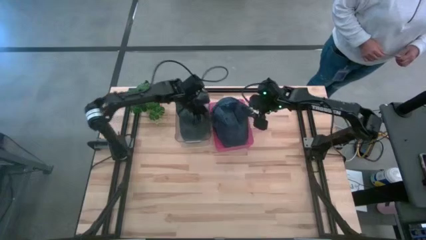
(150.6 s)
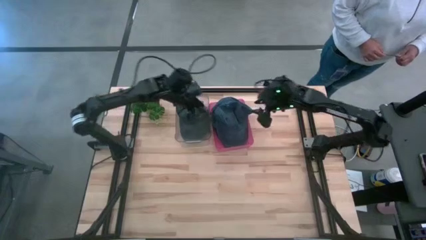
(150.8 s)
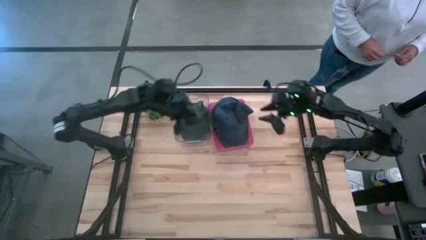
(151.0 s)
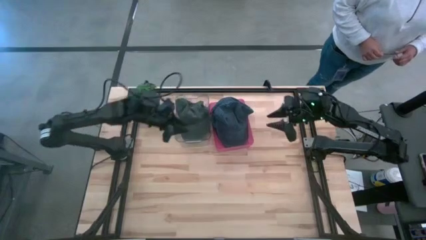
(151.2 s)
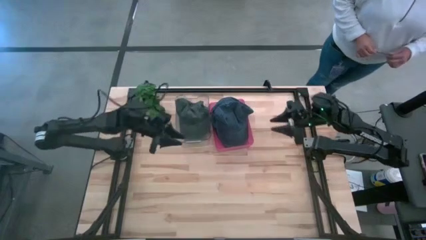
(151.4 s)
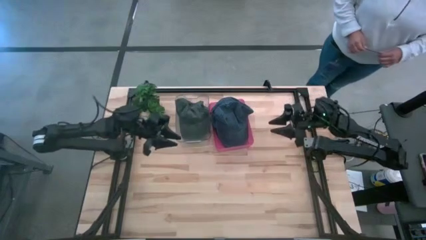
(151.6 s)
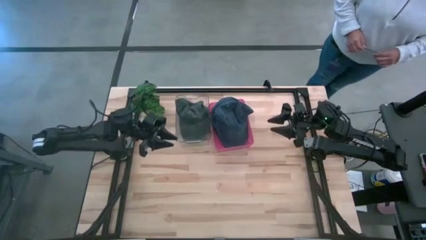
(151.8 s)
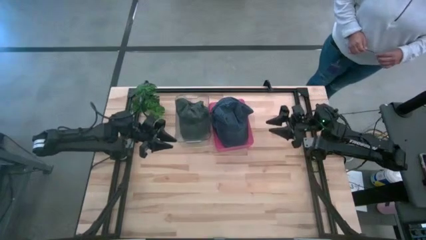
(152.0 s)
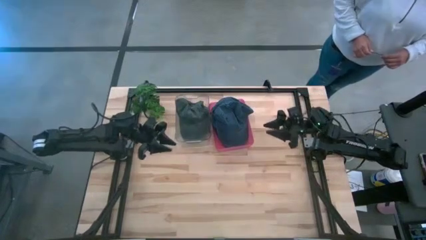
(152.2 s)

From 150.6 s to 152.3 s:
Task: Pick & Place hat
Return to Home Position

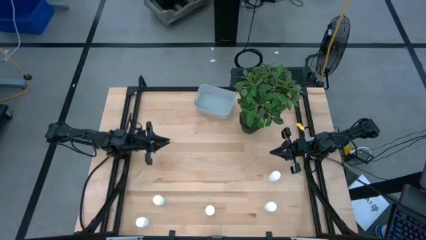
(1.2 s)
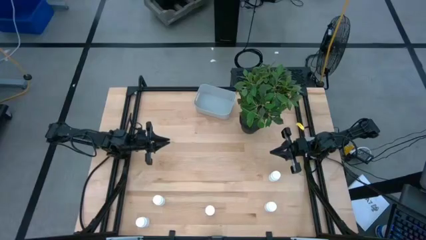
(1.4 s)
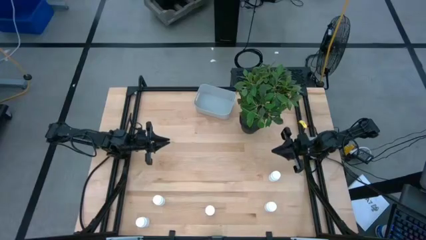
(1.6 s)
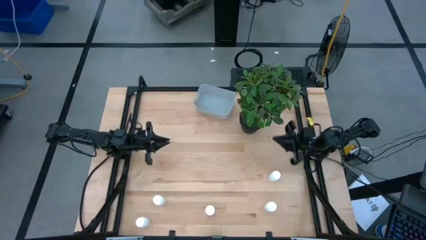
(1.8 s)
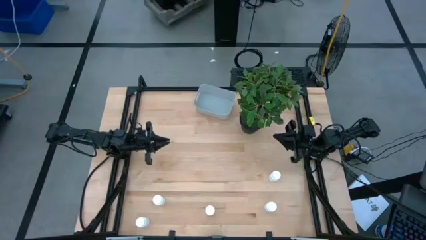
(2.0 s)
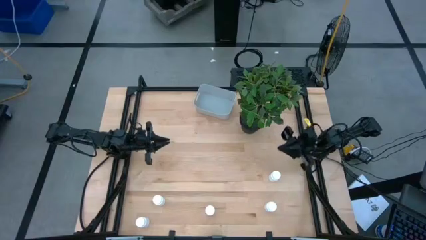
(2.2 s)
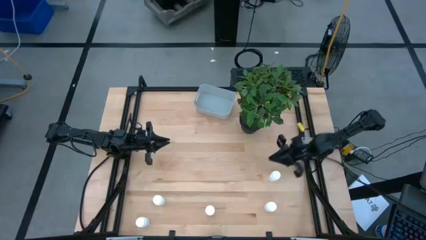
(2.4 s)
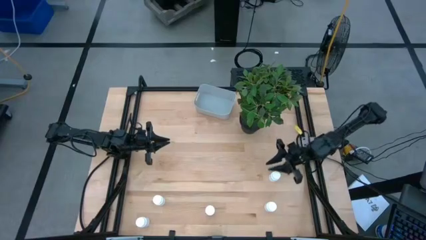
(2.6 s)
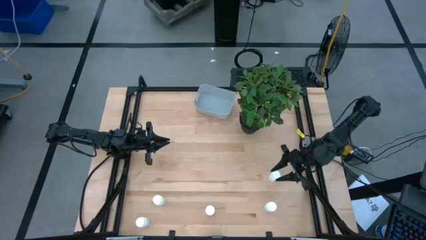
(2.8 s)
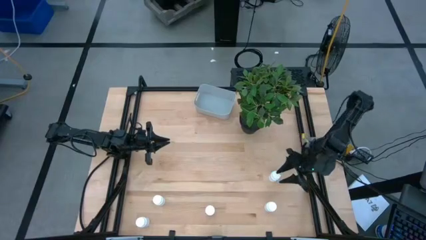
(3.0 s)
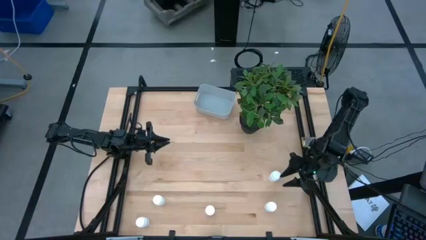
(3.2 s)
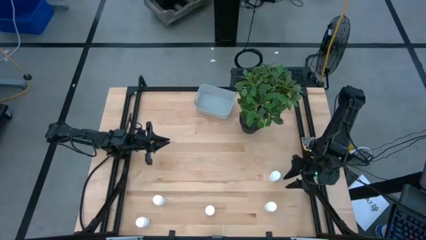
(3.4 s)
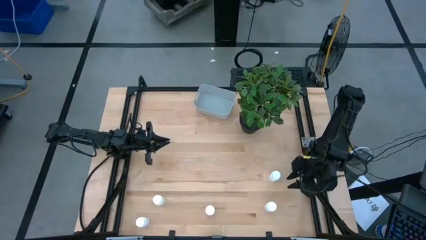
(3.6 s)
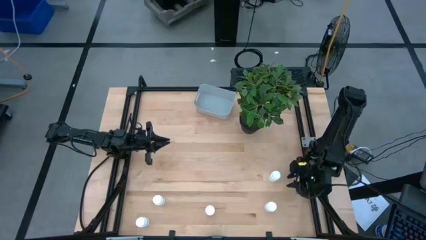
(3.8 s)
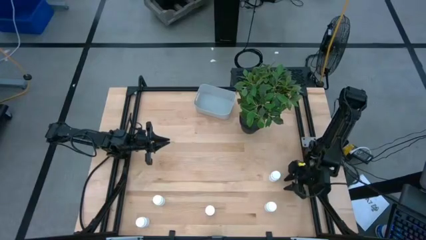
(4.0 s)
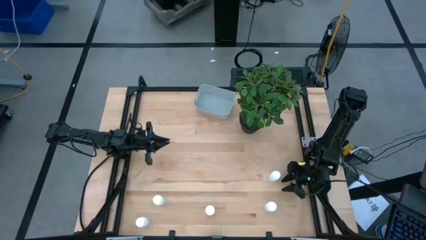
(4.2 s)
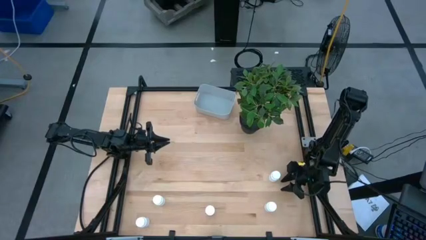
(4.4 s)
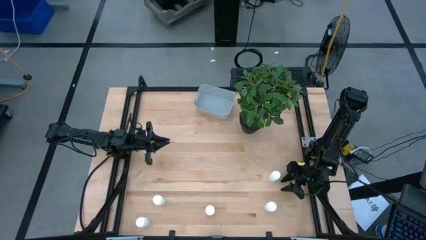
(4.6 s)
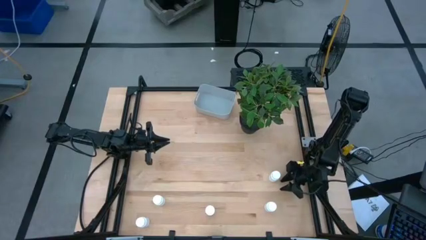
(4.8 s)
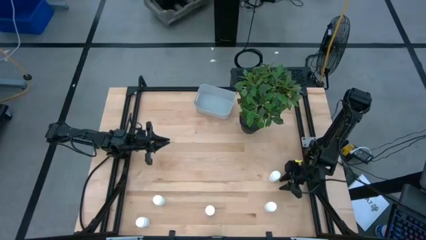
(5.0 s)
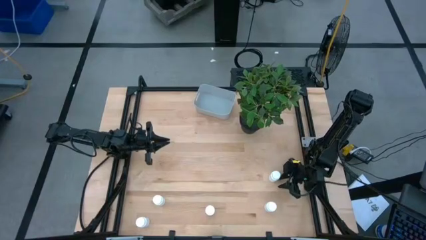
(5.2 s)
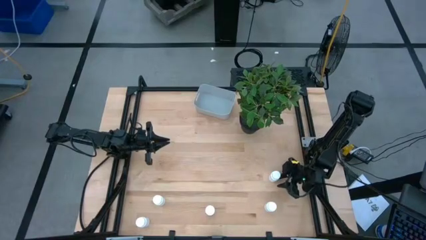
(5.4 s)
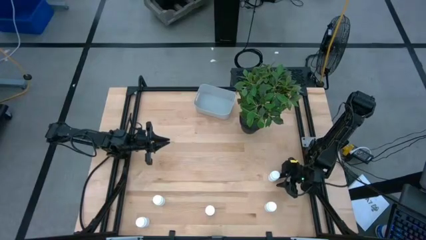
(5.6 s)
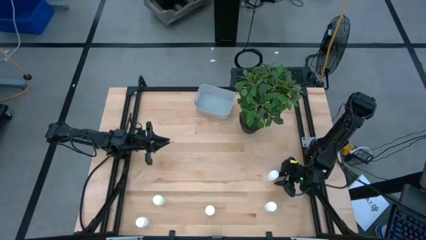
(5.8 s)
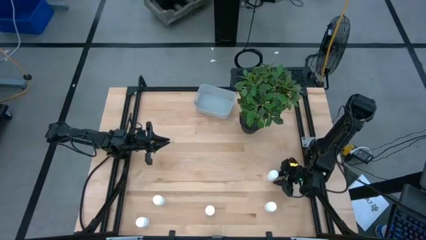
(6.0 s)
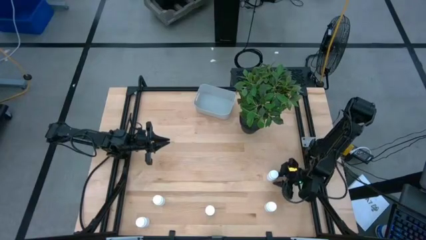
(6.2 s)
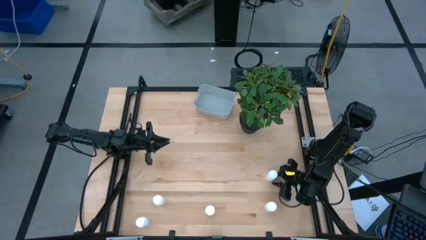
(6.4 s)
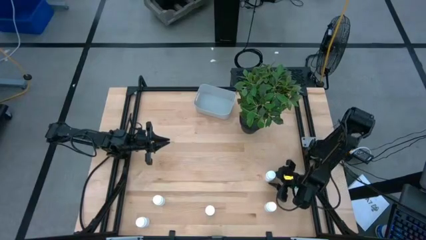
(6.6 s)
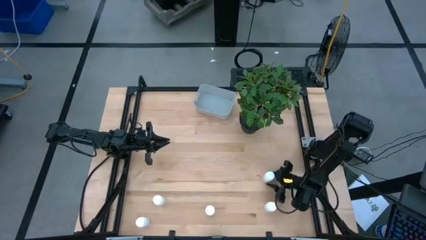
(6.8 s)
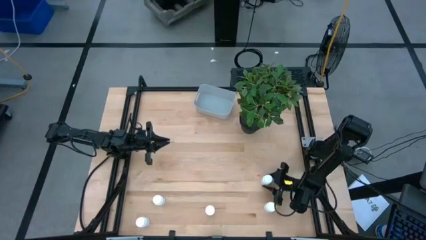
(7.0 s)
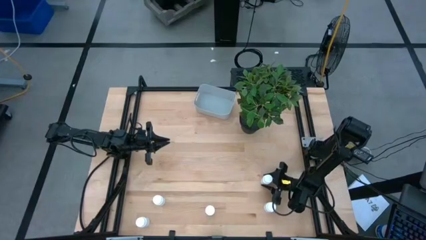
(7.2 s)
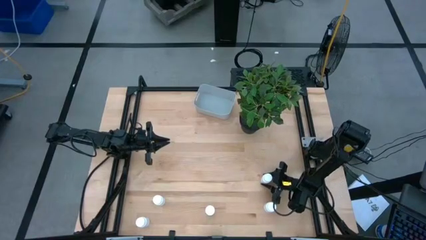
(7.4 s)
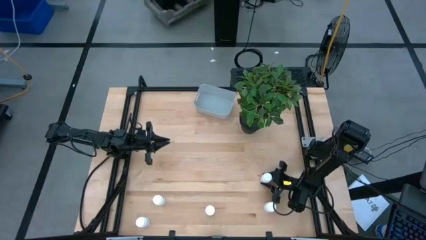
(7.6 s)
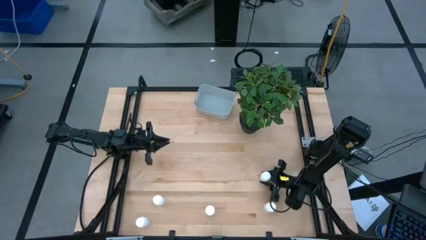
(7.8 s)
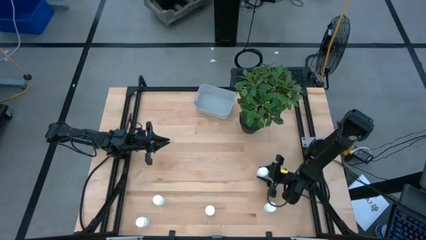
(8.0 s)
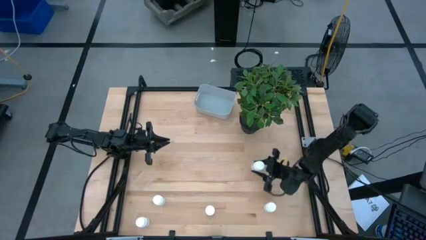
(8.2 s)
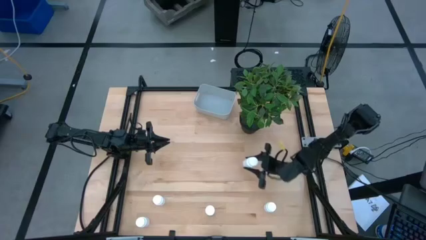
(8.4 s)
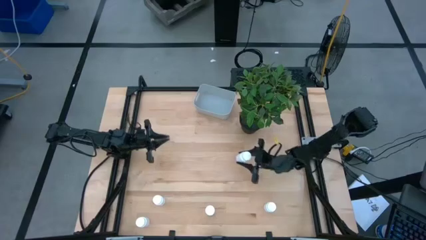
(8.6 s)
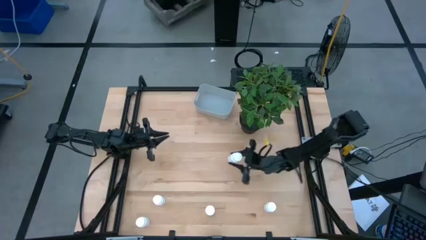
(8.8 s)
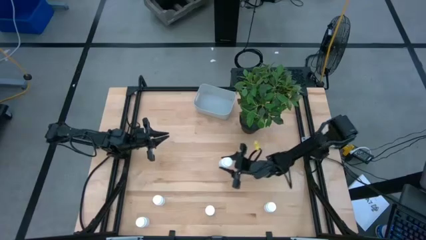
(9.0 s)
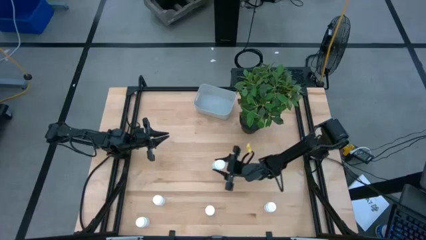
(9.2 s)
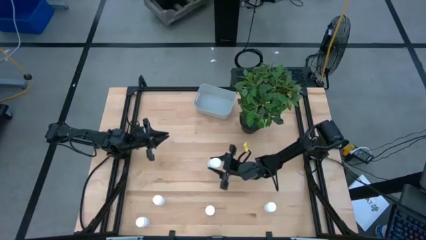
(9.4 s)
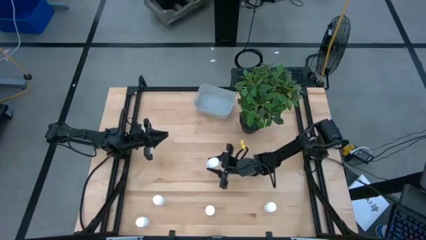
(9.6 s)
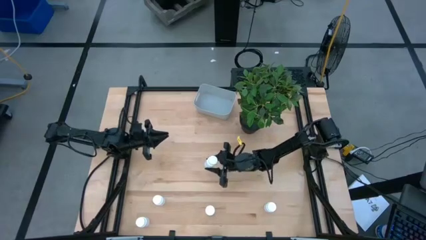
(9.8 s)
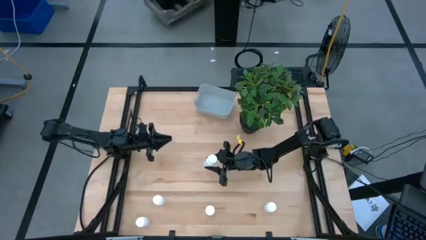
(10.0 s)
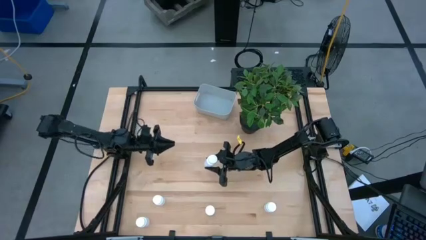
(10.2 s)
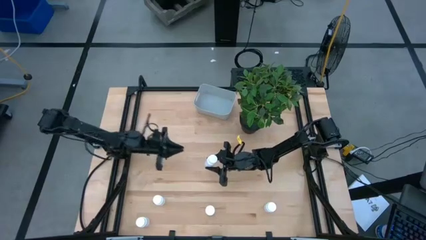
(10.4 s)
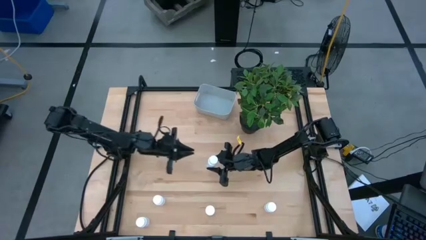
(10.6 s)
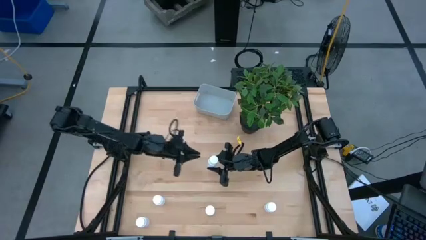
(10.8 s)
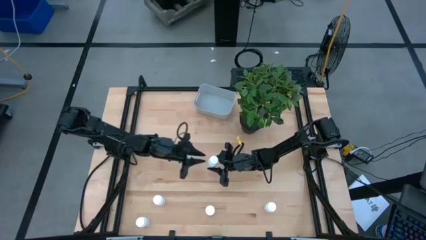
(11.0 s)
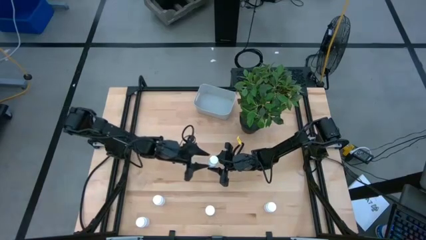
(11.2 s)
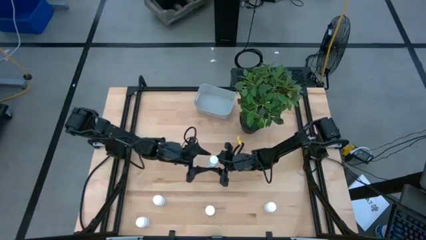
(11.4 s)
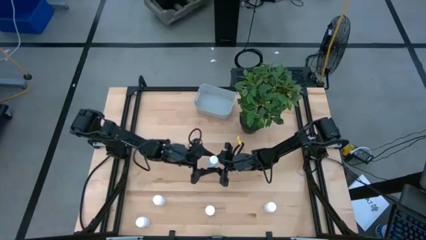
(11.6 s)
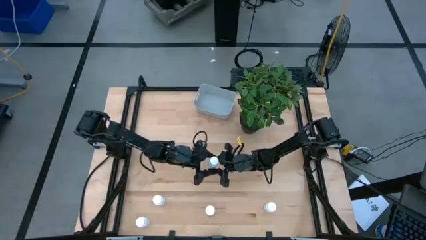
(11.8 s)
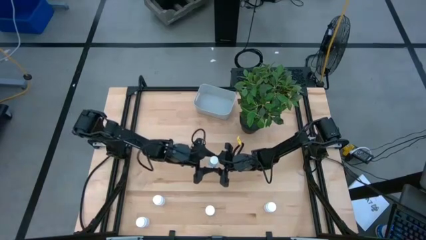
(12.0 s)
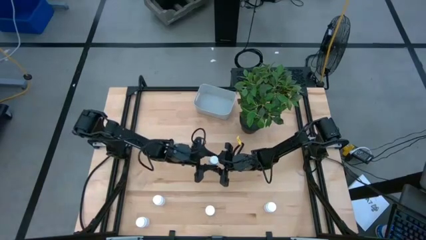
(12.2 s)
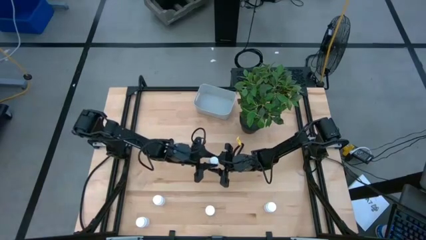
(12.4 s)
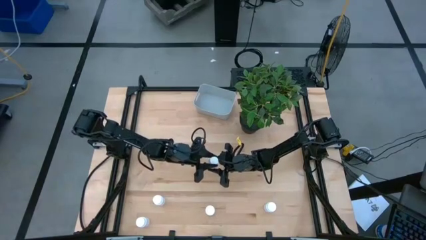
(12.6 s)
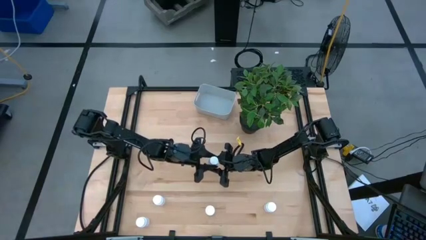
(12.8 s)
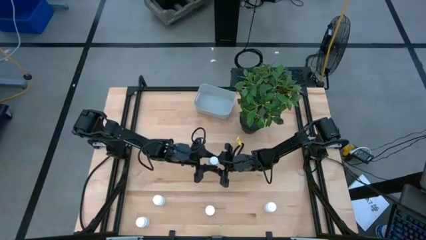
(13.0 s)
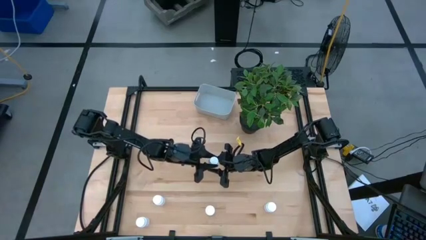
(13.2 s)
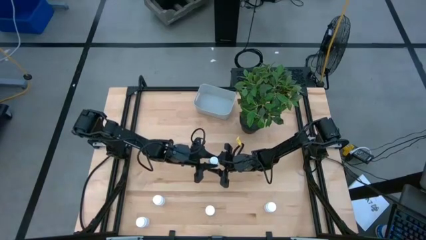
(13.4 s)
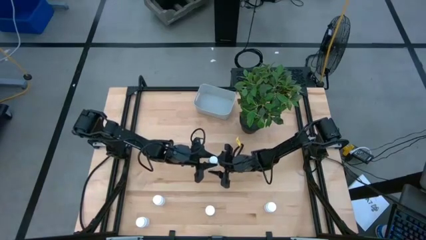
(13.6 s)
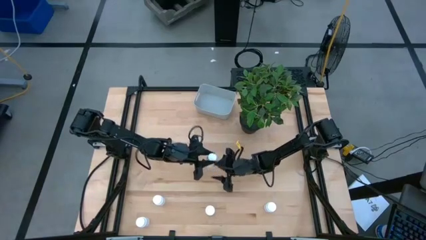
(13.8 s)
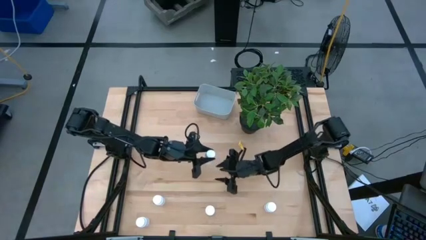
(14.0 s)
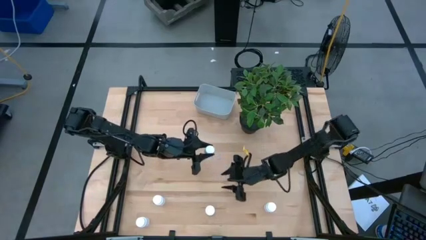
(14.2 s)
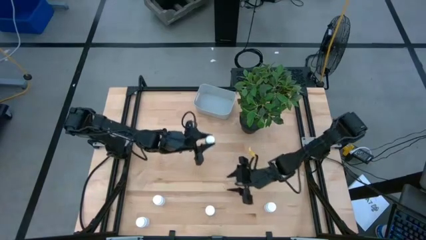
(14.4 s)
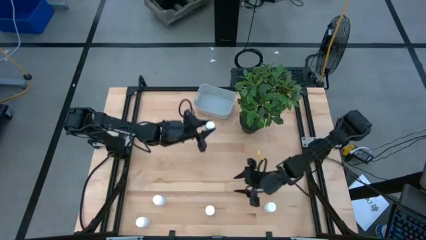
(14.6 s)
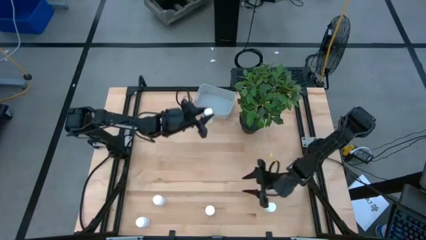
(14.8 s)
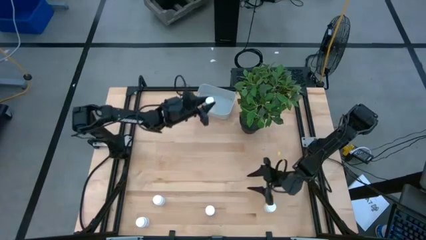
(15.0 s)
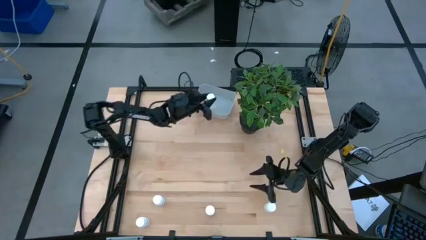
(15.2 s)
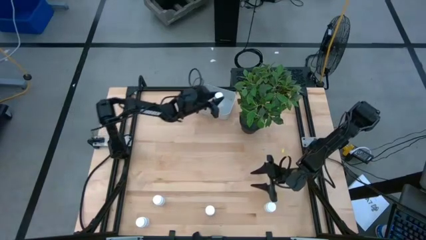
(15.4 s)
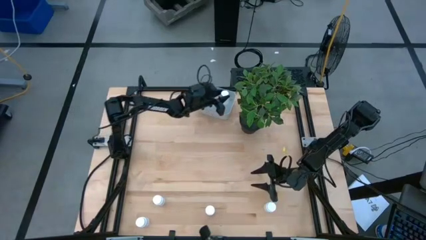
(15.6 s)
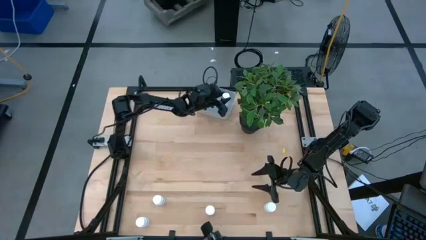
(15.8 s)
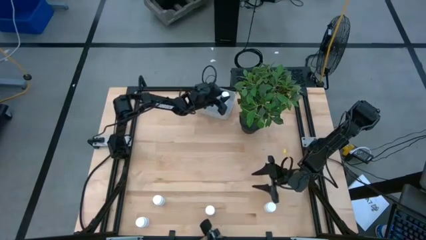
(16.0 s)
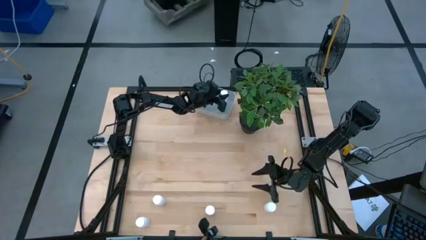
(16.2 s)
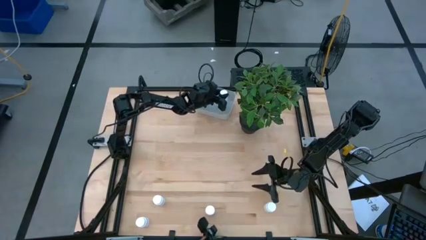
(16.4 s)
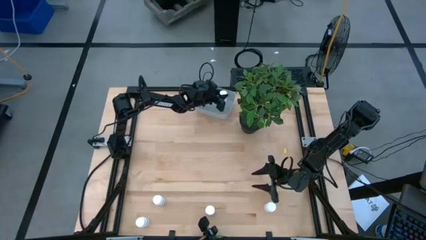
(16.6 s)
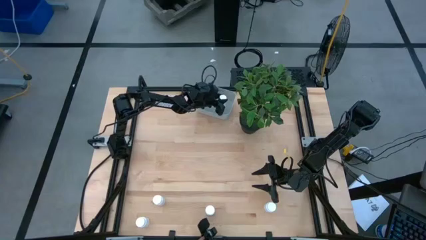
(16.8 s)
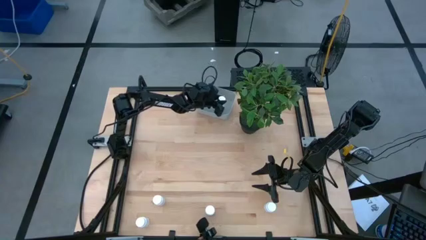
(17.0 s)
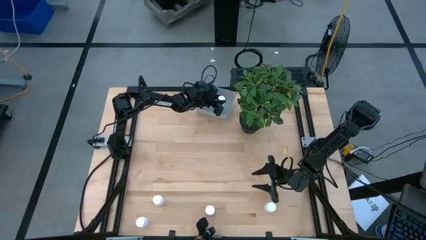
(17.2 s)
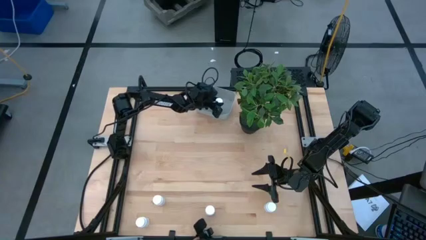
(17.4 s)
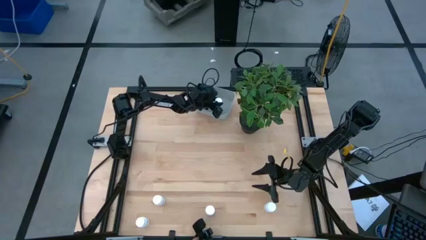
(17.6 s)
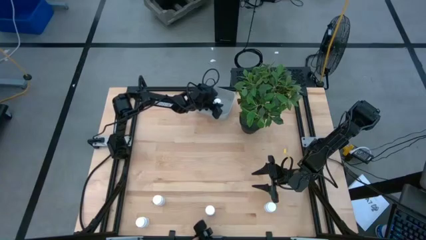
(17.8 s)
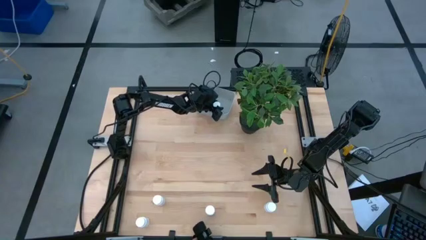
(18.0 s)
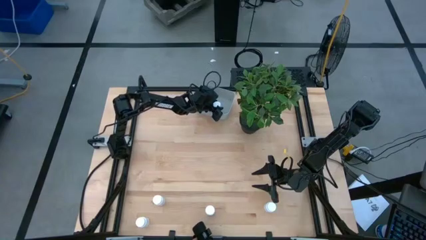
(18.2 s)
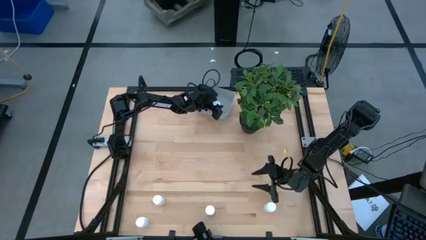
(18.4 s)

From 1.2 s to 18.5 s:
Task: Pick and place pill bottles into a basket
Put the white pill bottle into the gray bin
